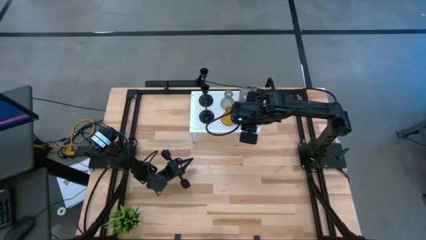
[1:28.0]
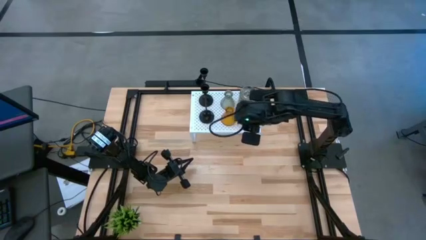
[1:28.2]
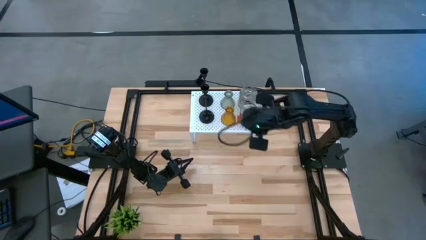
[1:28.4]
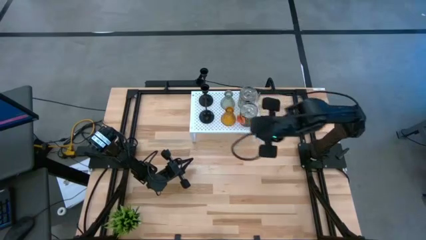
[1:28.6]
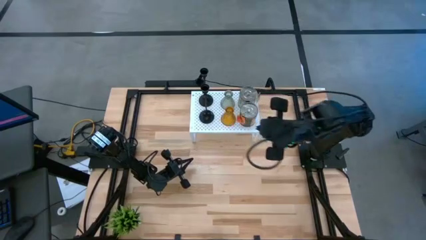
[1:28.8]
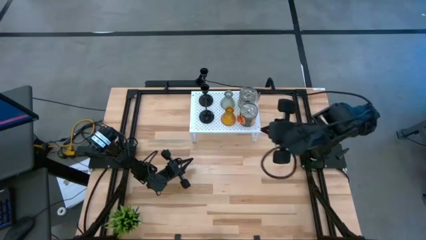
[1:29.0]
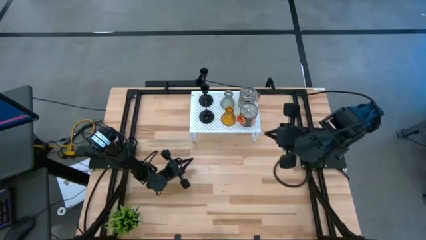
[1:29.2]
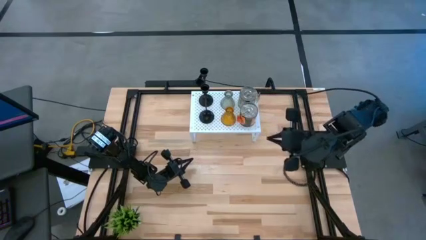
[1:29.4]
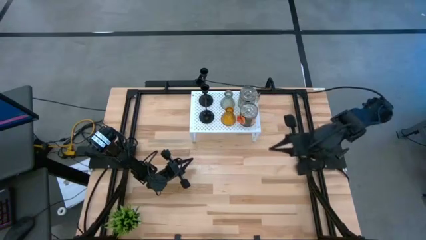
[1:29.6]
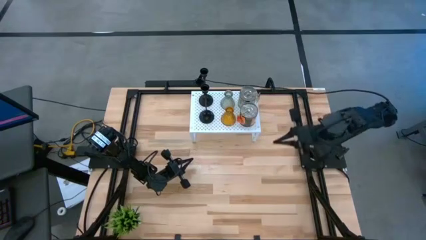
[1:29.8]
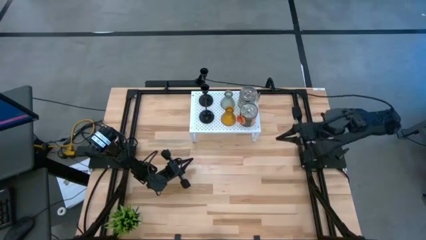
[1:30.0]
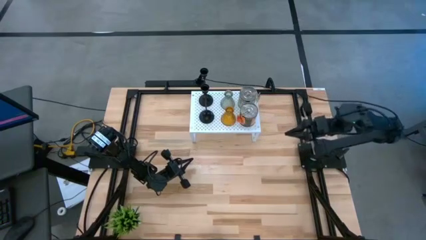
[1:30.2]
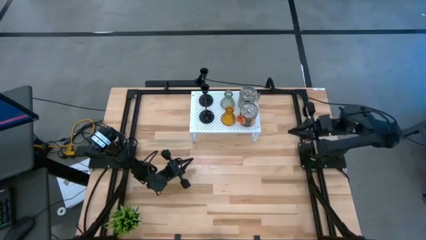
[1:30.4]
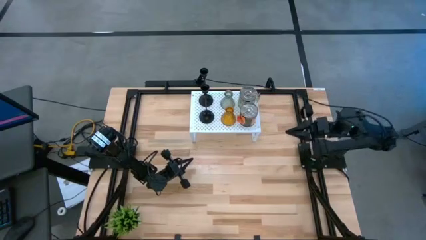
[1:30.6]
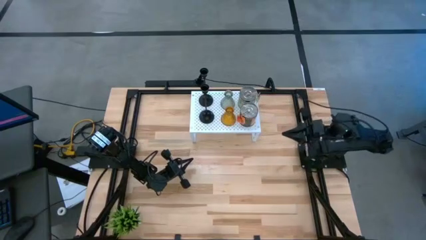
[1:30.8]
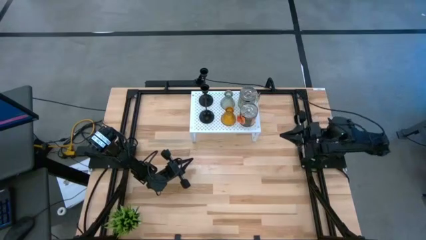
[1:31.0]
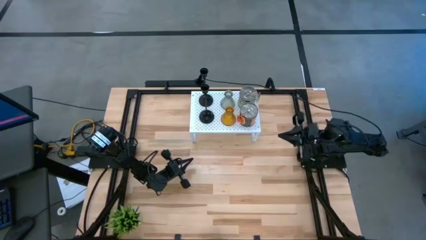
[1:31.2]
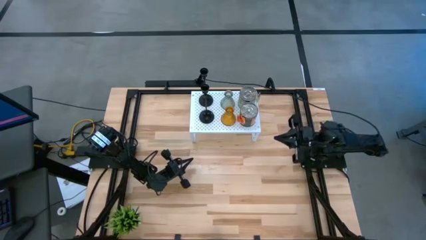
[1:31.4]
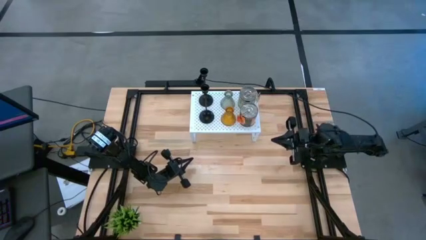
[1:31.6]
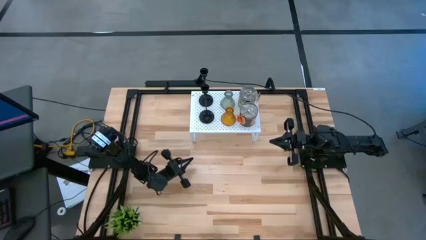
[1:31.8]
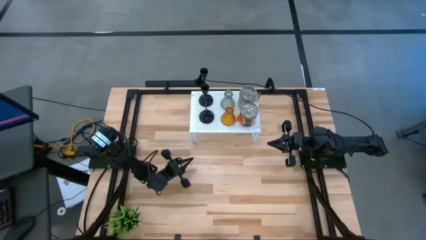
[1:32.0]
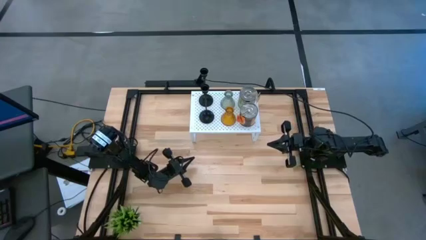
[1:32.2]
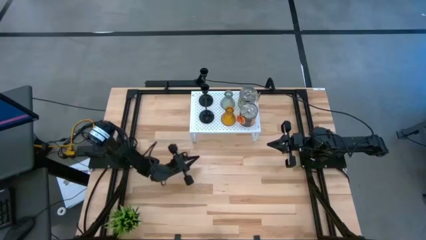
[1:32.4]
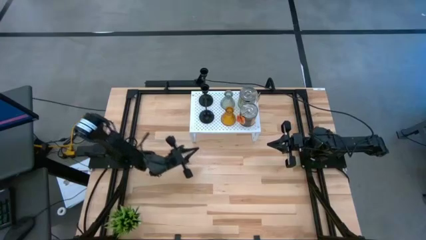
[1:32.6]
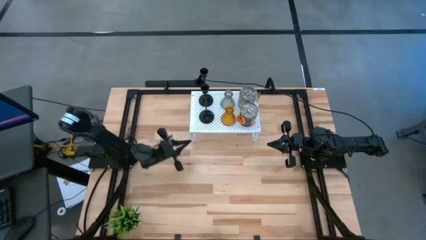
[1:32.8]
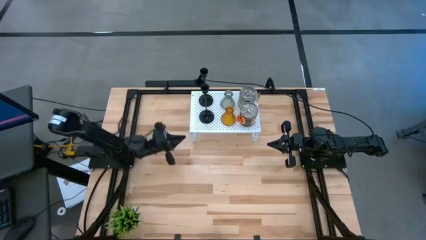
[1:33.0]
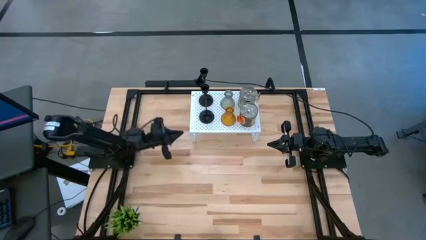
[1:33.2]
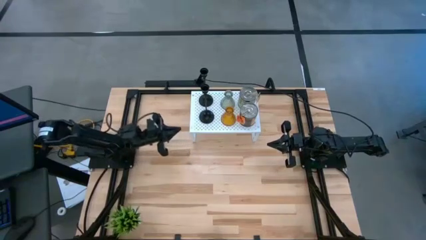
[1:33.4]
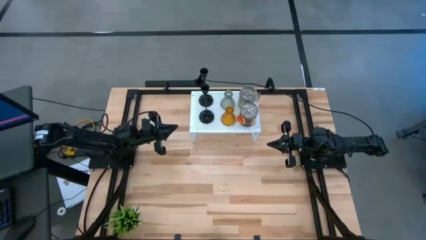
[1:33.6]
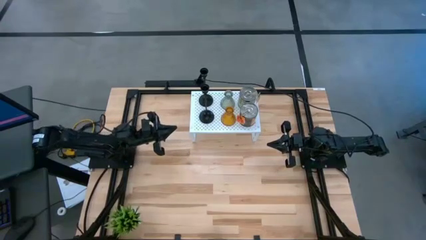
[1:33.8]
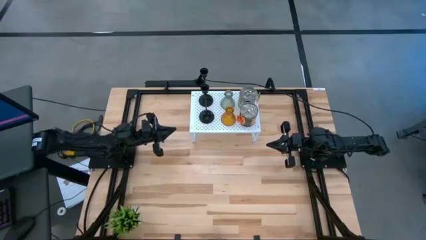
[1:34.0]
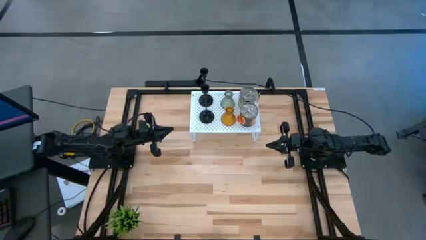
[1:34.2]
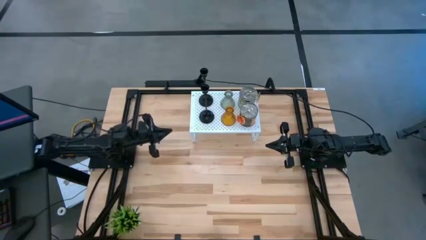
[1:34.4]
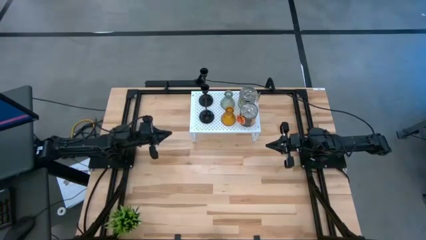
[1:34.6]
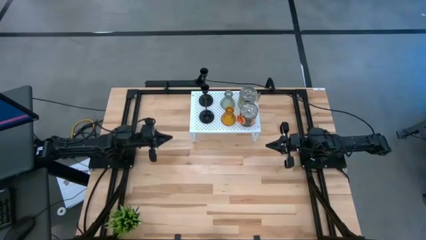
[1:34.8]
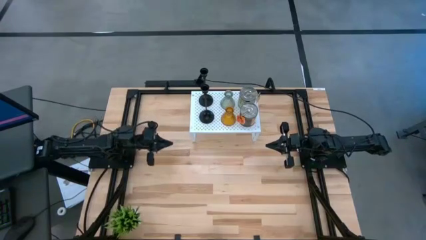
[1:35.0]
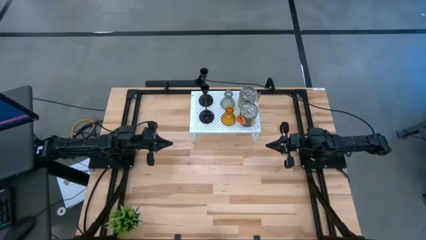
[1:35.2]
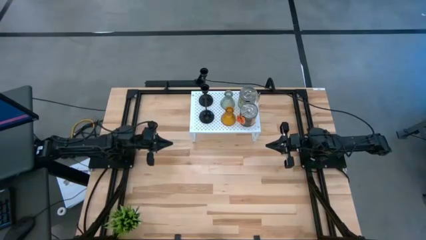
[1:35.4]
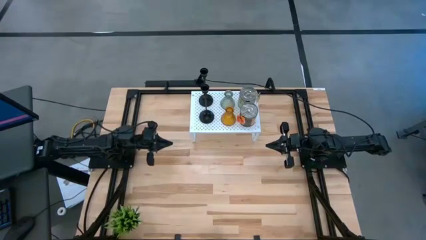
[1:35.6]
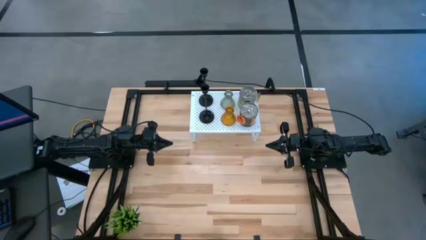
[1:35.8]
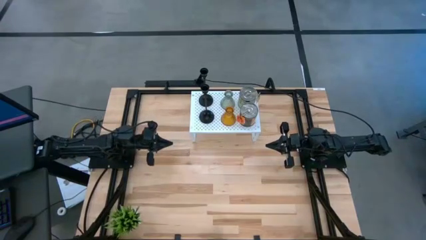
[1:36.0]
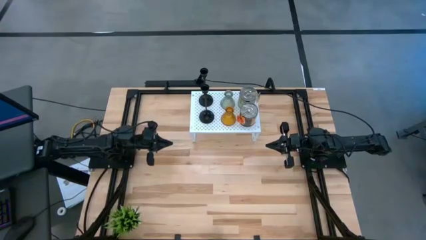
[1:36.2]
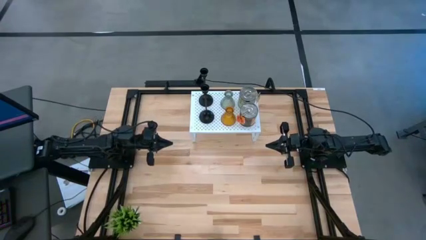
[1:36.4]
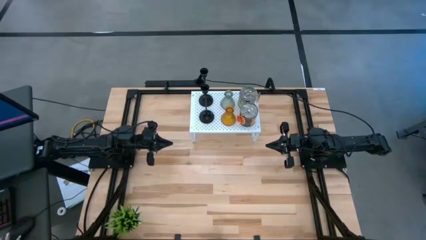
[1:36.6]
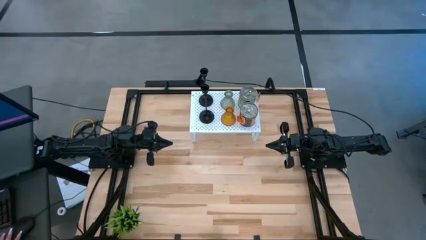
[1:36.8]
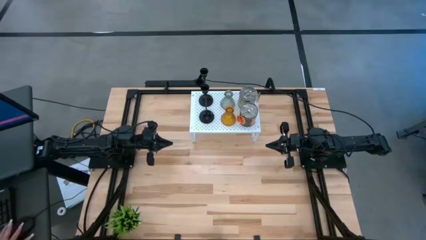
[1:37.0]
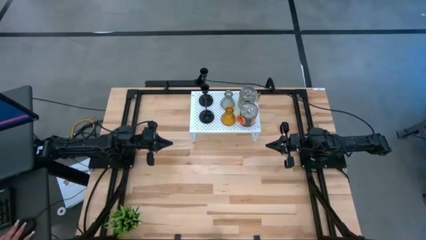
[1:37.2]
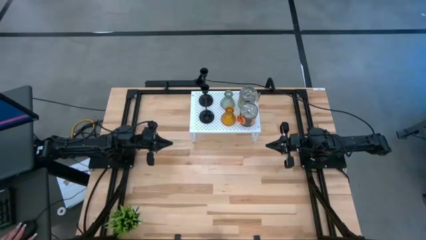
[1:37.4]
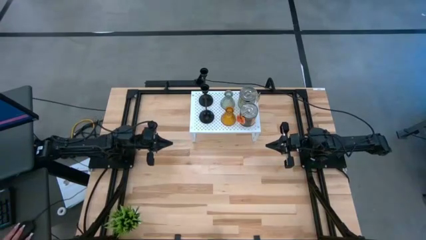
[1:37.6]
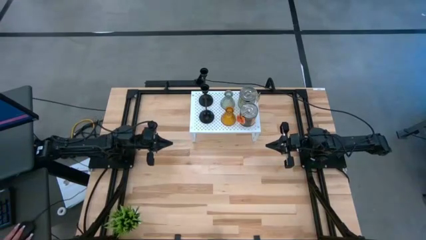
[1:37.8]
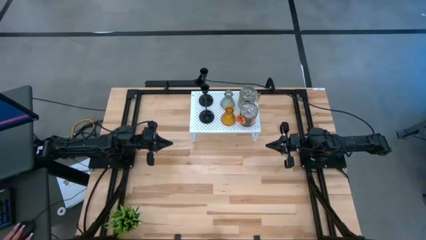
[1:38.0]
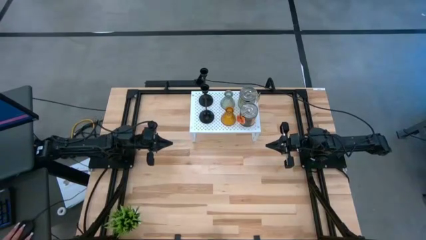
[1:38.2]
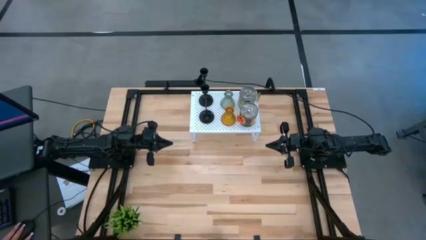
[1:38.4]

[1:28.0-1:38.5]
Task: Pick & Place candle stick holders
Return to Home Position

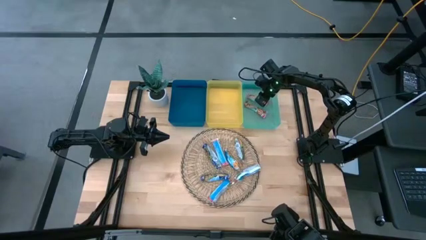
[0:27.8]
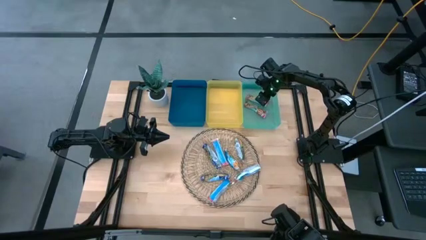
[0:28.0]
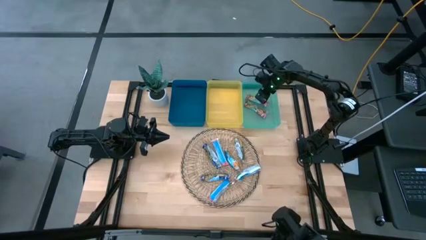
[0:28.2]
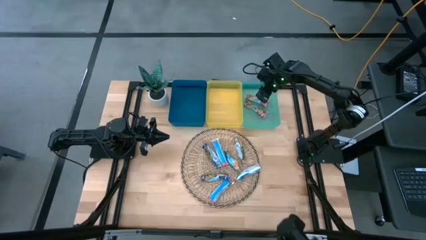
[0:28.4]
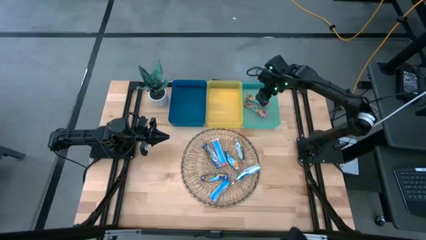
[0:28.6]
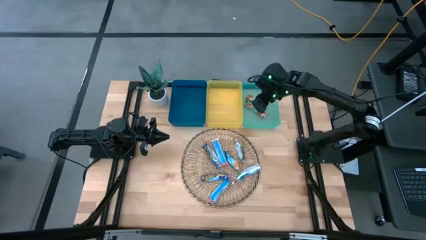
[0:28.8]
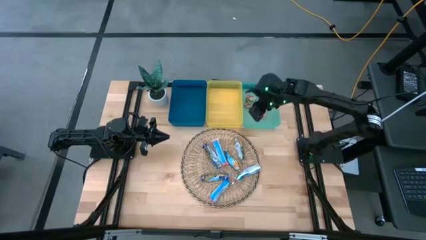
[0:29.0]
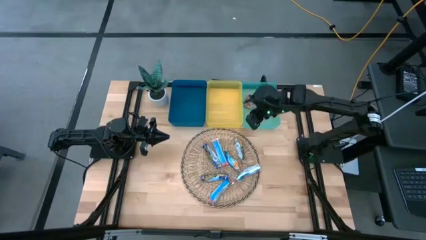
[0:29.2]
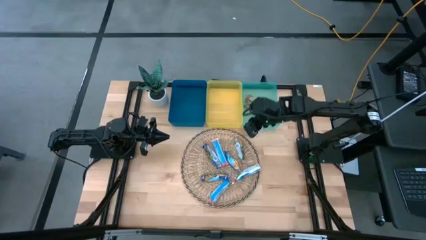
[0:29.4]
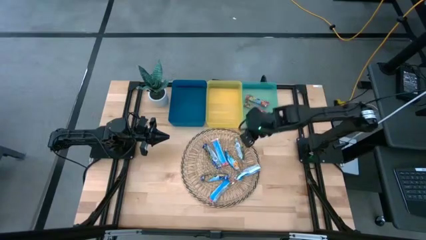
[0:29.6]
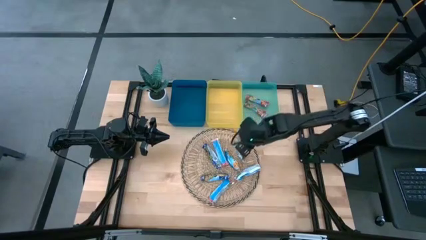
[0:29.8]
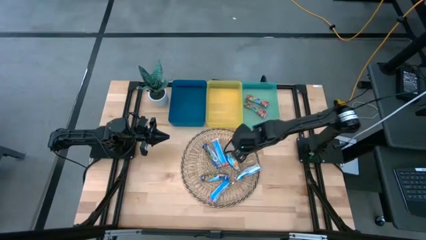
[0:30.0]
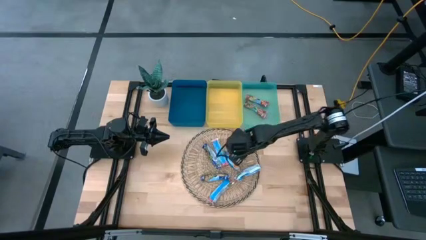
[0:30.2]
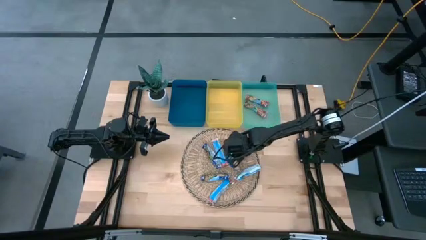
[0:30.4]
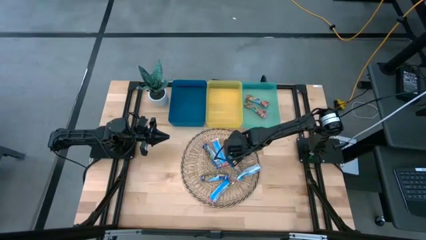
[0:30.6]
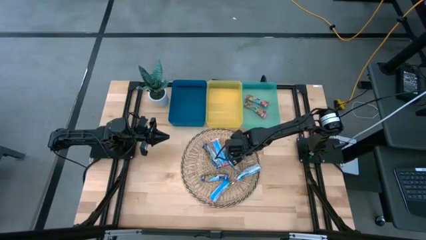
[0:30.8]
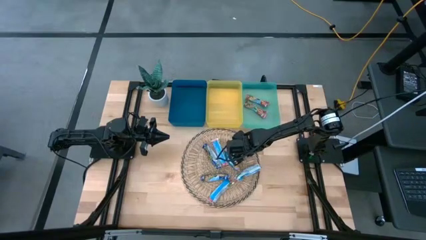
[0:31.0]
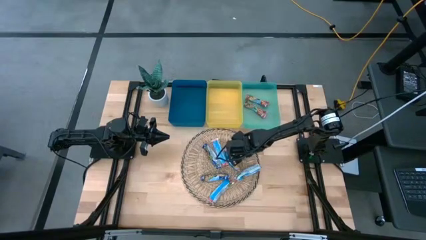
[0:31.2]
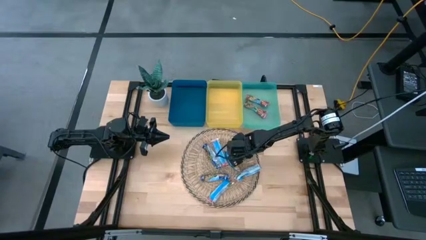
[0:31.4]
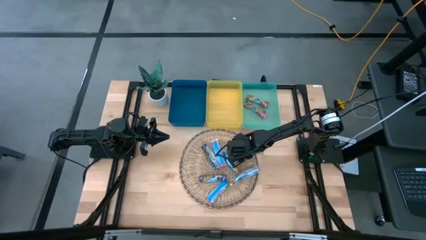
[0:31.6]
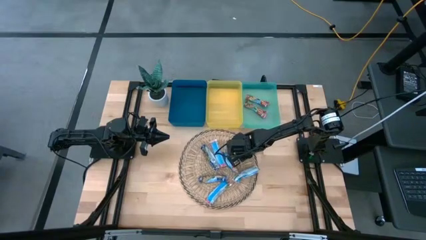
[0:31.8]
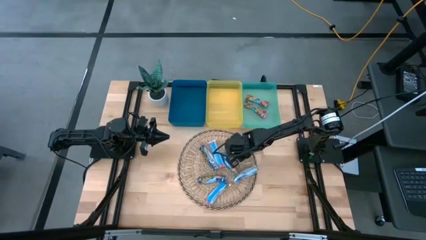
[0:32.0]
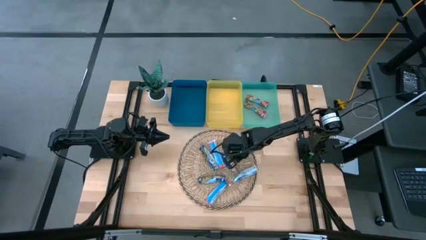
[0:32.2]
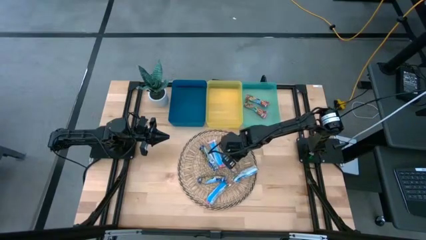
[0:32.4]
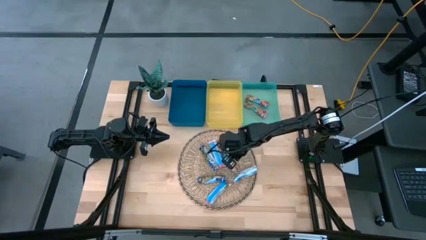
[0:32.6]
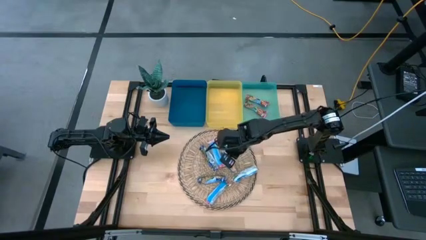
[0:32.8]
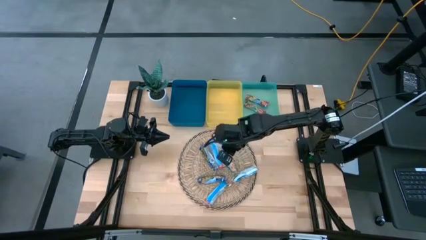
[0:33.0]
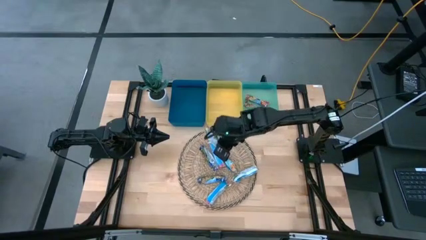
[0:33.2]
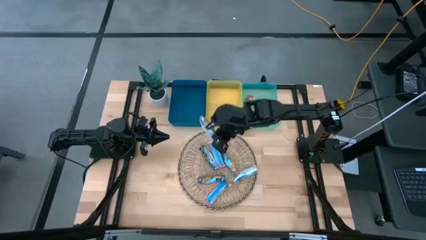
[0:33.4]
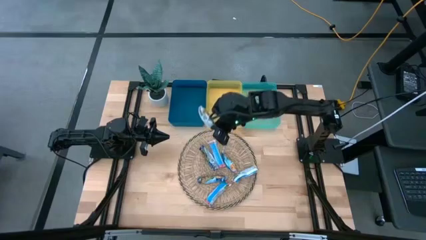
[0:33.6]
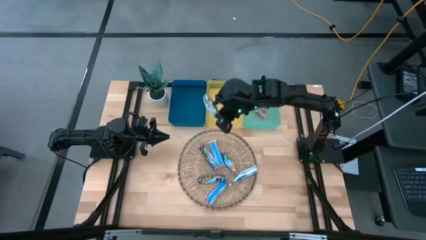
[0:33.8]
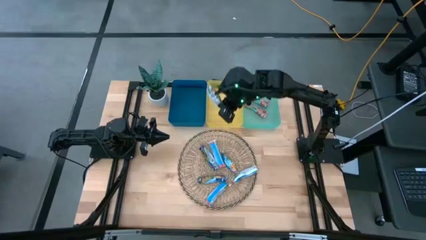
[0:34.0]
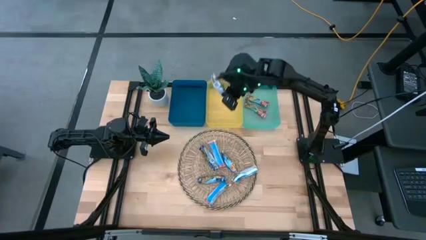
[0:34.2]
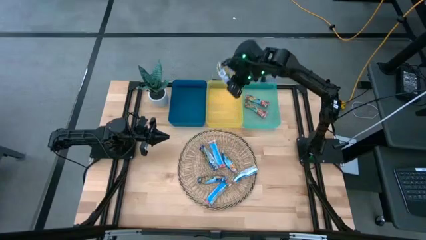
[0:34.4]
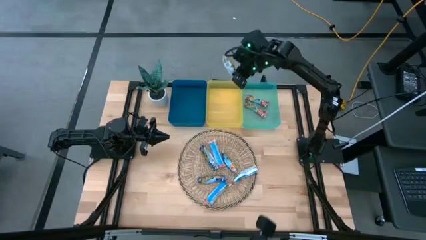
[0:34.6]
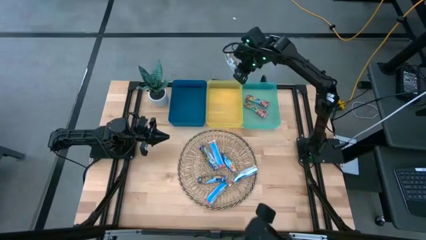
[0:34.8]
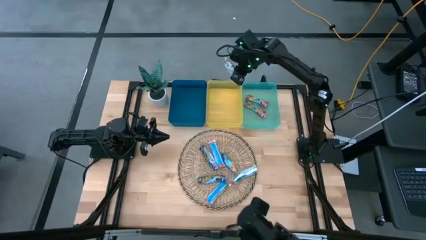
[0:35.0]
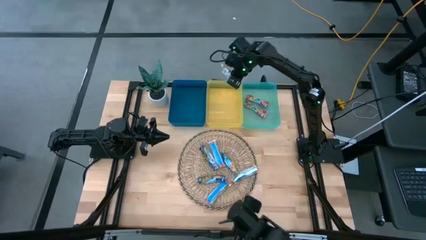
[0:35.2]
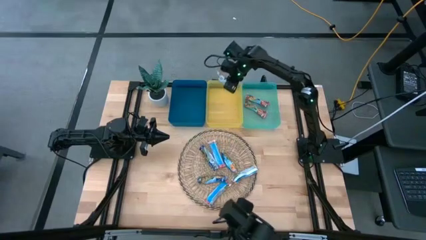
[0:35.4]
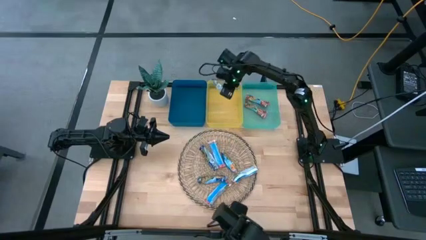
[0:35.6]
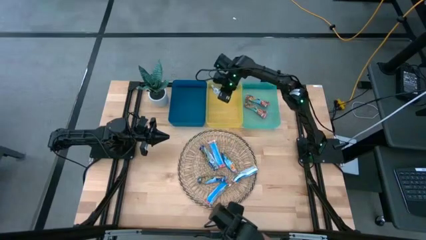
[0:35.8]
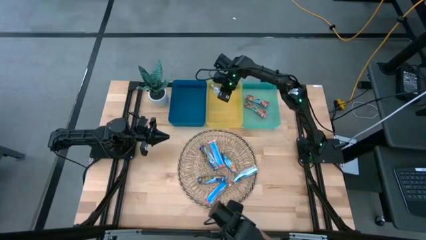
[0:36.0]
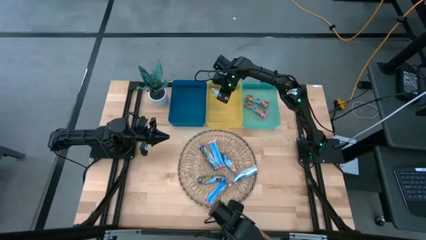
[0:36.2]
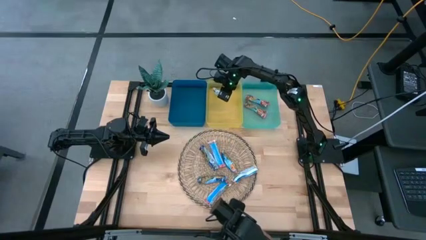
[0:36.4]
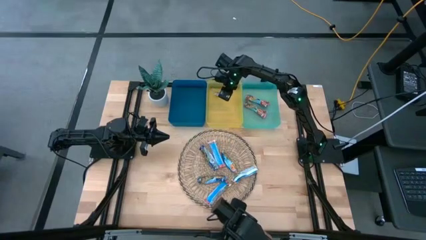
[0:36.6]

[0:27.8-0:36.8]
Task: Pick and place Granola Bars by type
Put the yellow granola bar into the yellow bin
